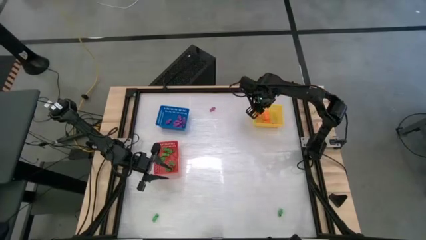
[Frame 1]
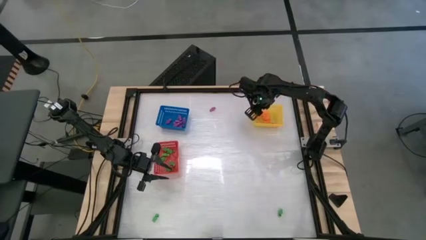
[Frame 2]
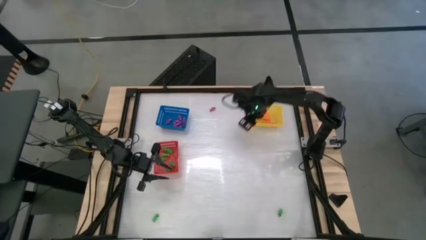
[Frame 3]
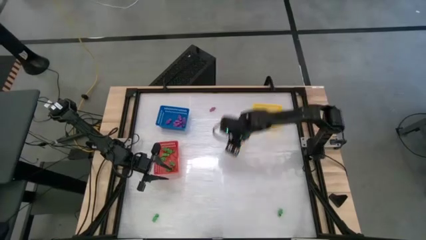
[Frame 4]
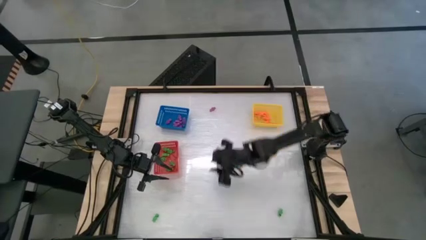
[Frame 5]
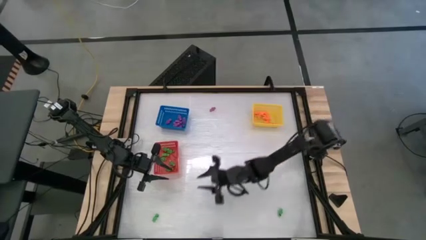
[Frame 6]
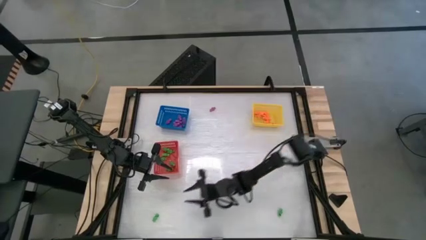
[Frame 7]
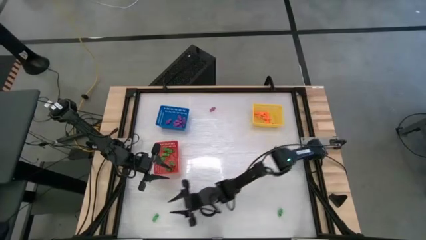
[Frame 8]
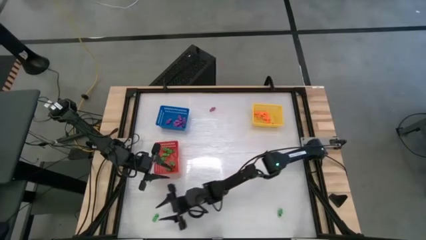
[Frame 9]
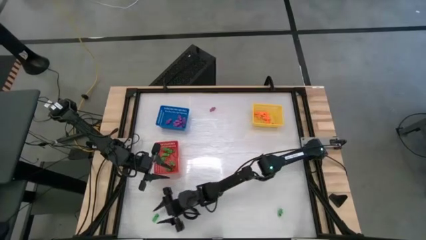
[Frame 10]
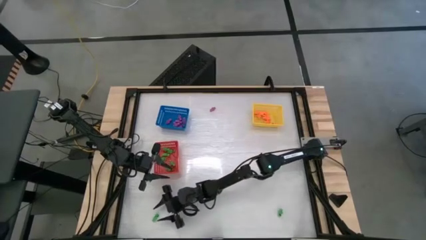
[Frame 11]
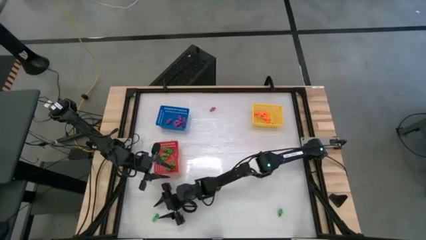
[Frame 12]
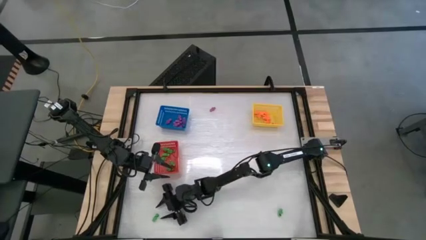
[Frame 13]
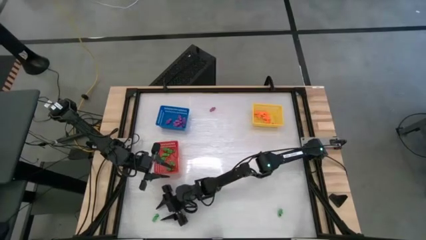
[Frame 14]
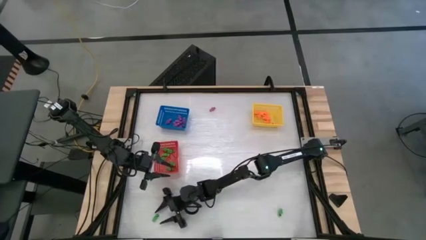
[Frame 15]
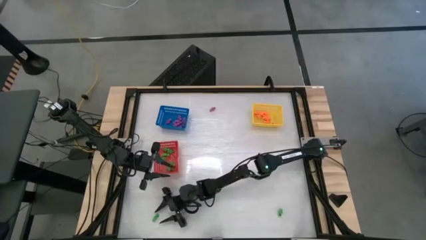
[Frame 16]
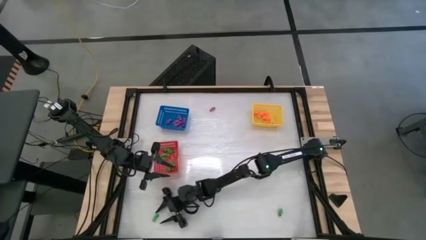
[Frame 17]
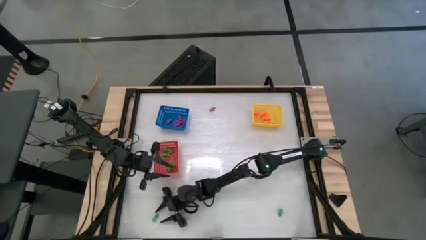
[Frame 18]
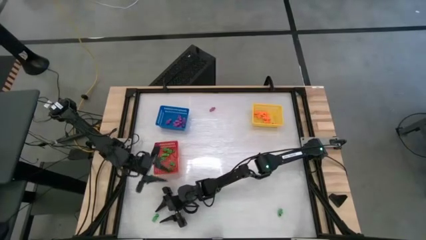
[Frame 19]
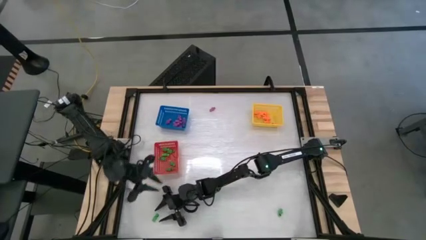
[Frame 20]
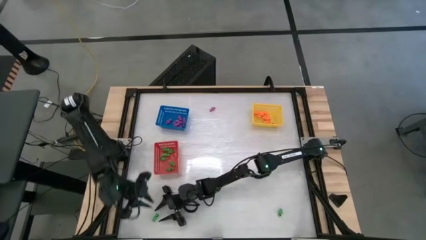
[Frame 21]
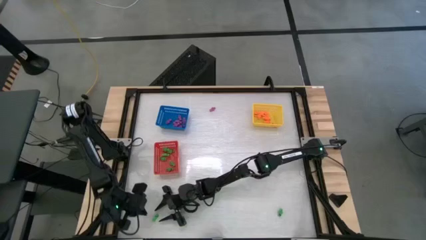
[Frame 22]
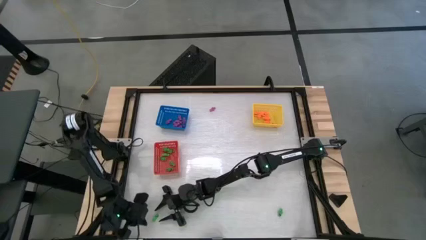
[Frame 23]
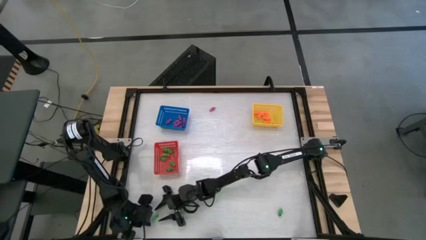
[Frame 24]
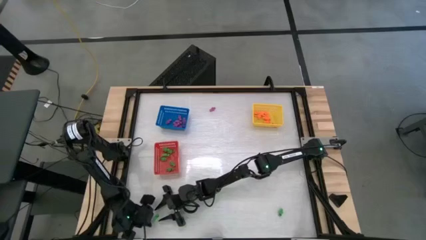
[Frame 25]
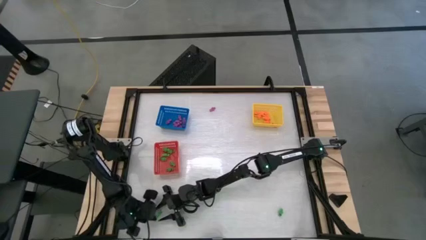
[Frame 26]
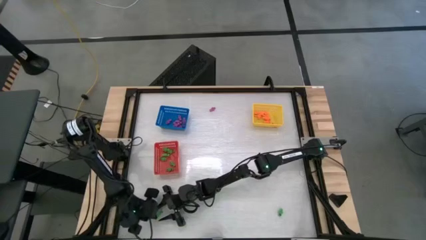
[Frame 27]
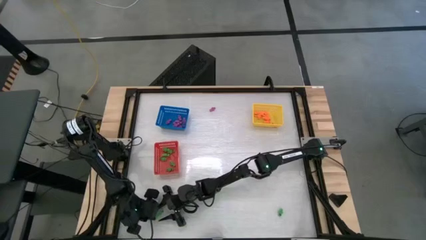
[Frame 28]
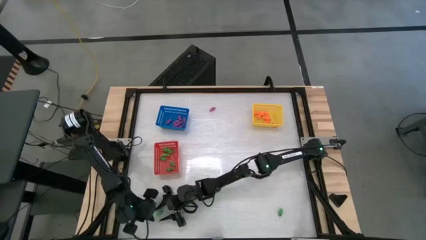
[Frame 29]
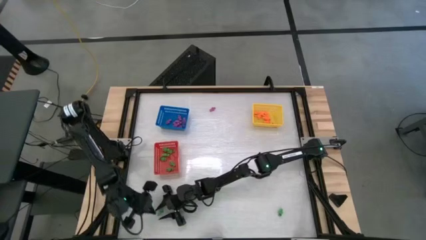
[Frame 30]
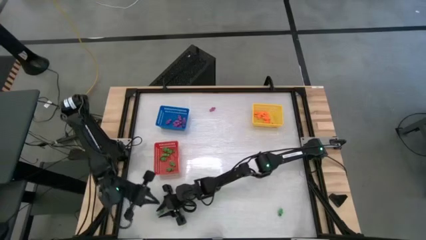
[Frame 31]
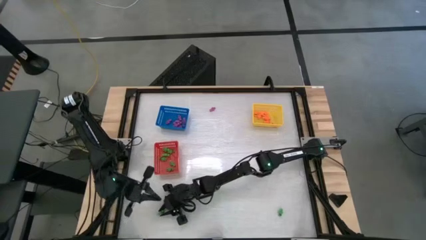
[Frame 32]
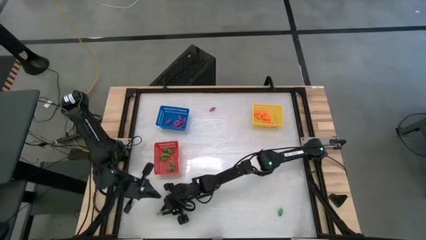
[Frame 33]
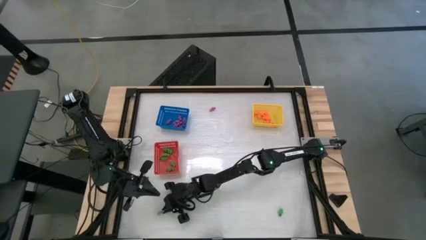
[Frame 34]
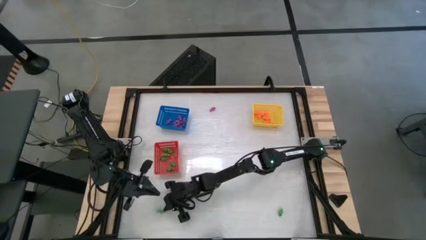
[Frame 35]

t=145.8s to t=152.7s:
Task: Sort Halloween decoration
Put the green skeleton toy into the red bin

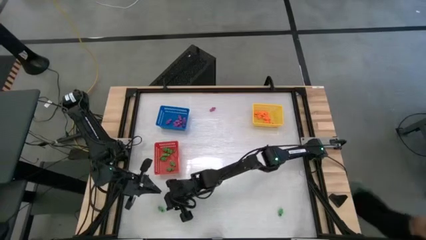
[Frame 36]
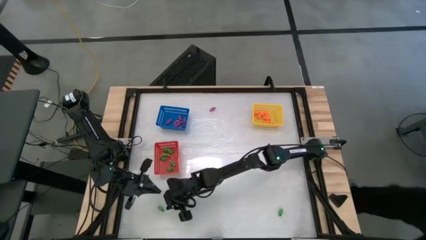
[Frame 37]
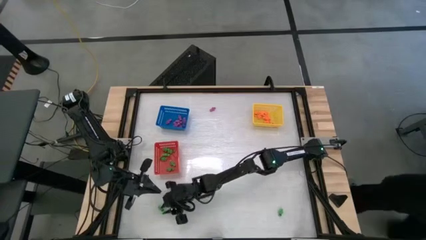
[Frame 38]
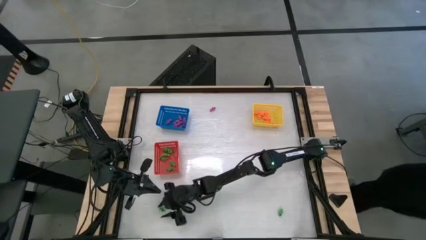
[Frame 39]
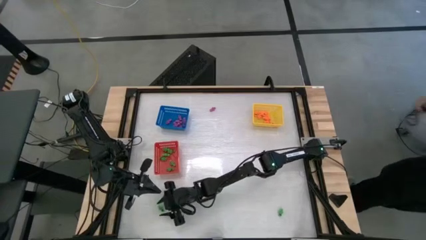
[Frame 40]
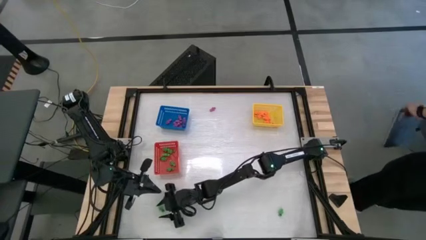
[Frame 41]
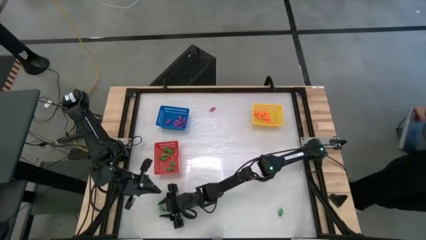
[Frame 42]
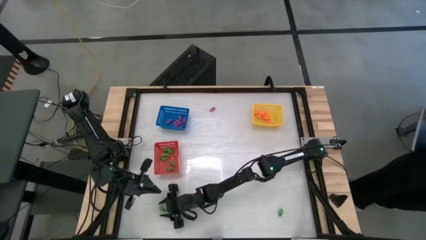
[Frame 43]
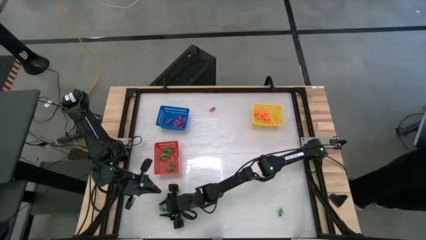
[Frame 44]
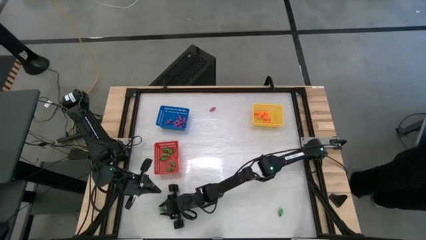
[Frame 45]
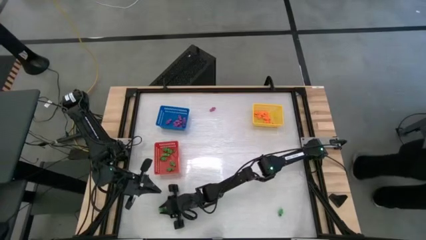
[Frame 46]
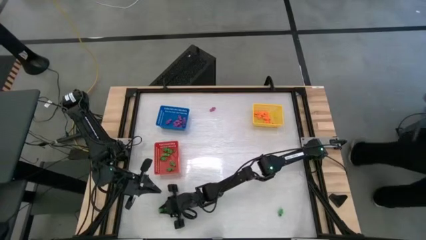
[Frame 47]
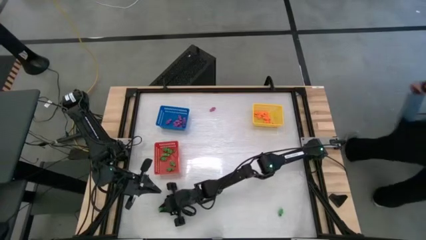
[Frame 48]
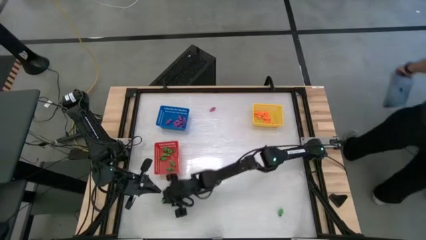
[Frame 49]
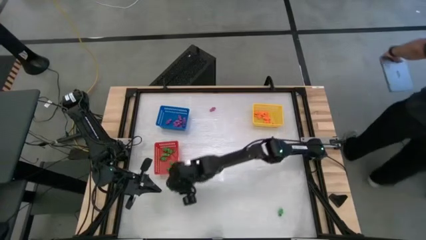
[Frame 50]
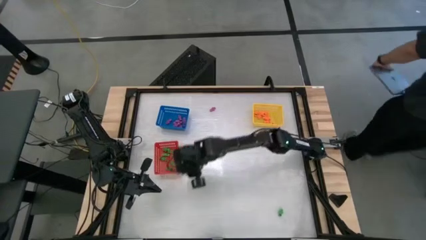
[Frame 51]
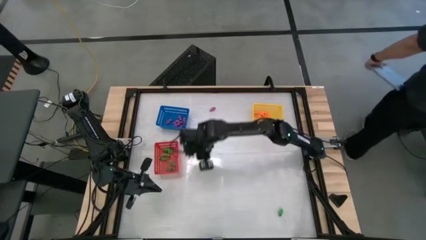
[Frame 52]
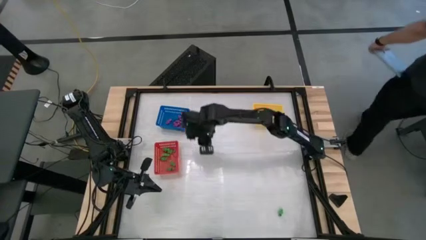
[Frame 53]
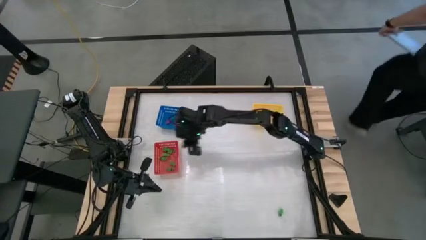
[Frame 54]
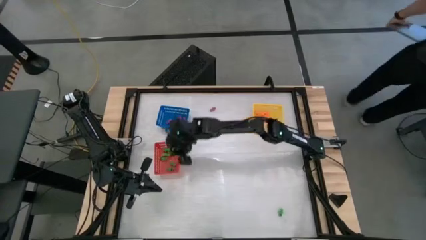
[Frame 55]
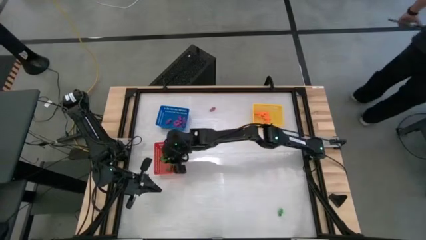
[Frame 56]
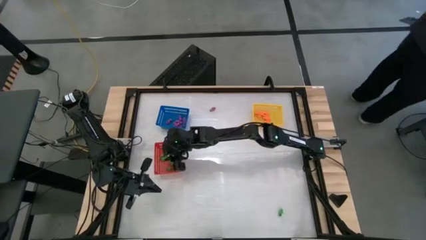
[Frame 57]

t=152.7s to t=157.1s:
Put the green skeleton toy into the red bin

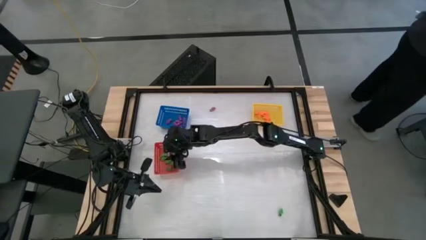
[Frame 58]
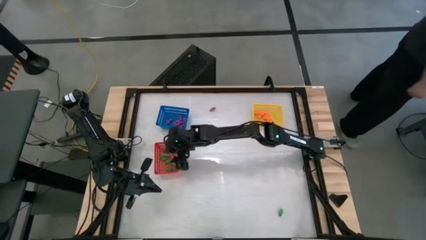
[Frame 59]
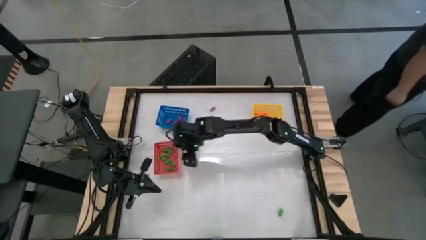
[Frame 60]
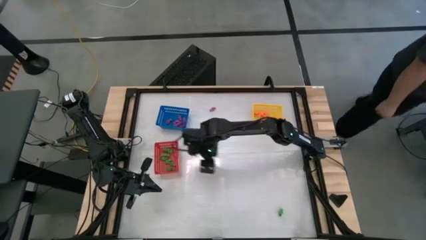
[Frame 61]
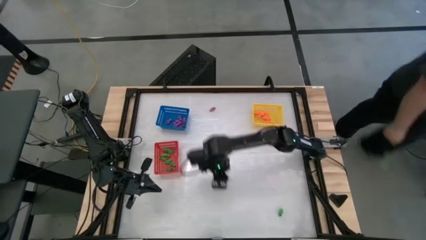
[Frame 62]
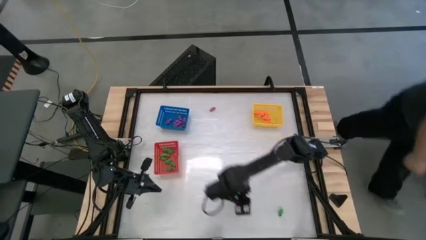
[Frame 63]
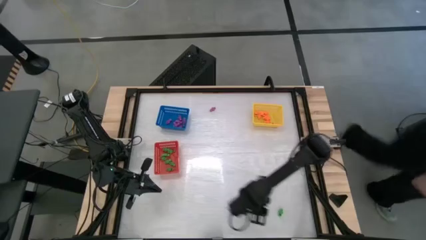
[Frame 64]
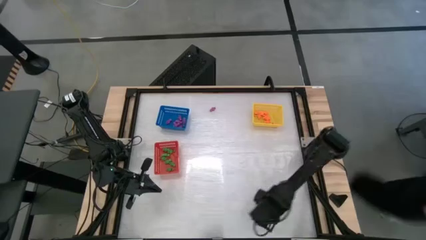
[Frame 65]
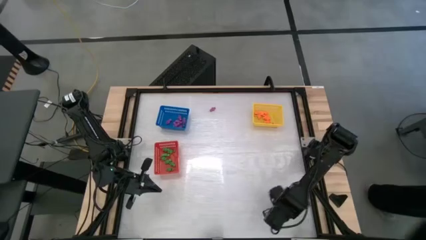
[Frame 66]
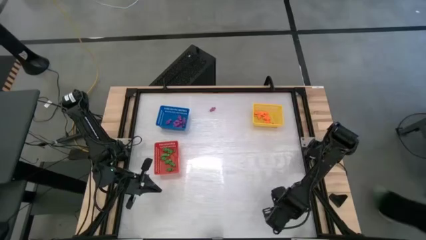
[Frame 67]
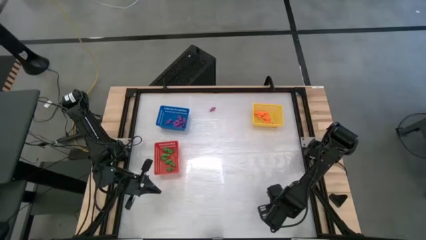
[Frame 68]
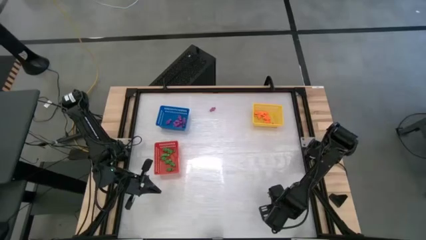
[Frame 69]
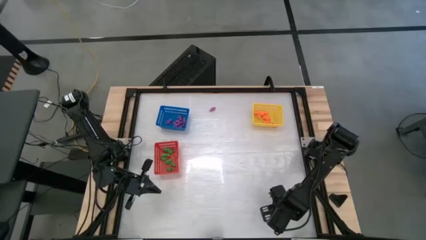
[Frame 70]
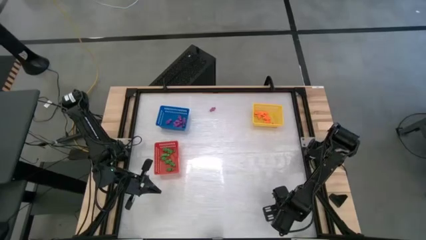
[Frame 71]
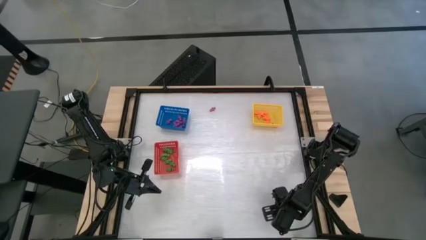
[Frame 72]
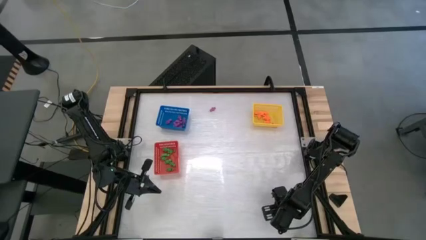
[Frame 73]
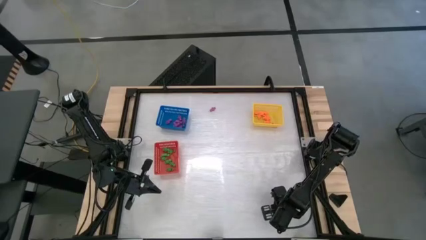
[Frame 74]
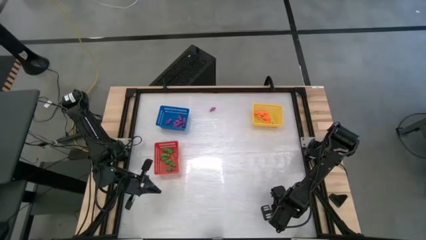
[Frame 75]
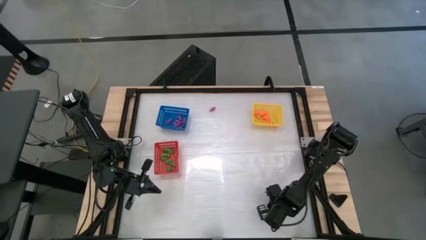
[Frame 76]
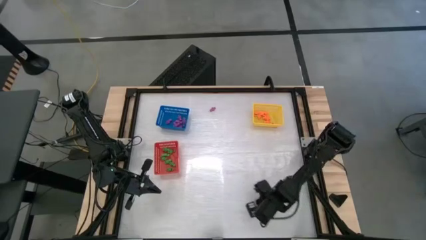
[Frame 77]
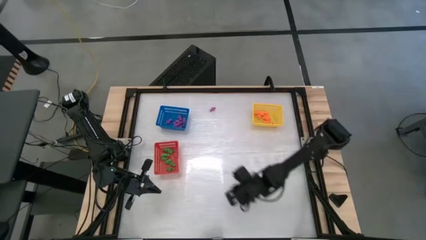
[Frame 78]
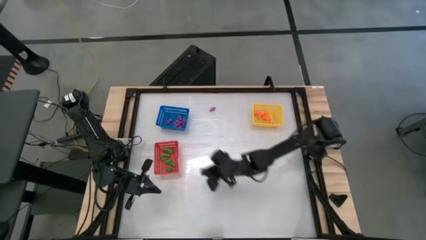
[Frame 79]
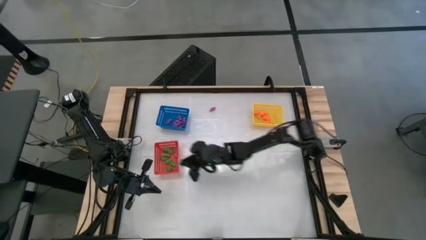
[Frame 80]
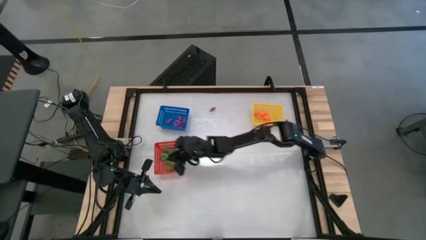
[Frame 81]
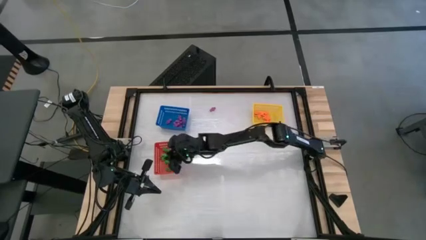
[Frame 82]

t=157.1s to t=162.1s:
Put the green skeleton toy into the red bin
